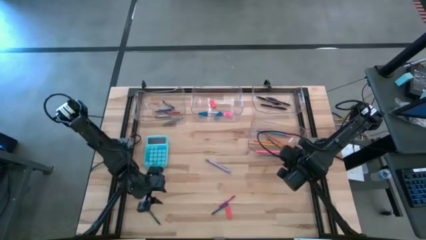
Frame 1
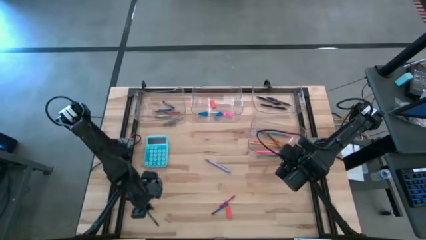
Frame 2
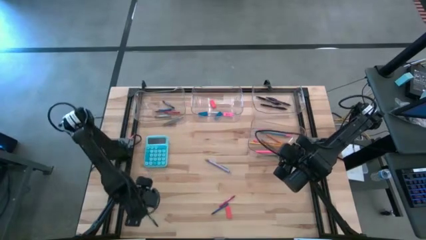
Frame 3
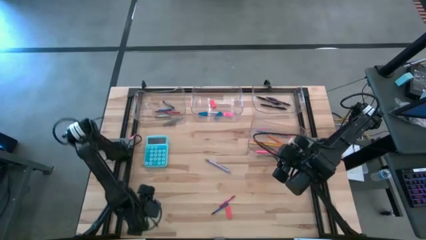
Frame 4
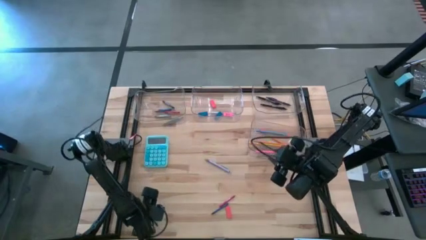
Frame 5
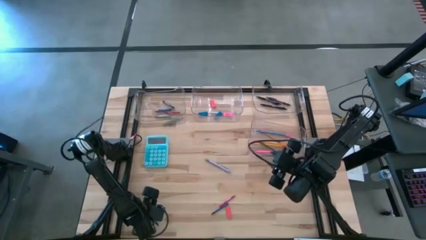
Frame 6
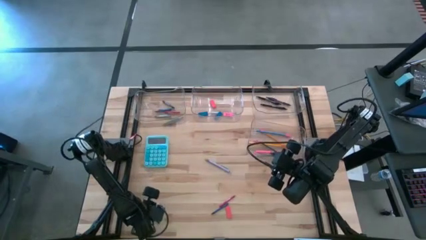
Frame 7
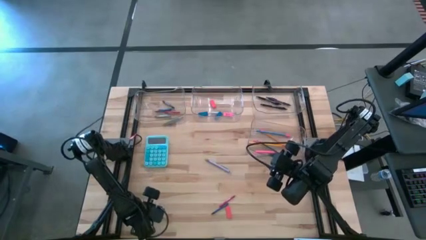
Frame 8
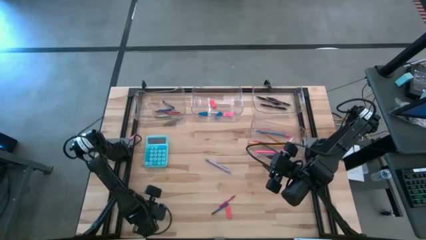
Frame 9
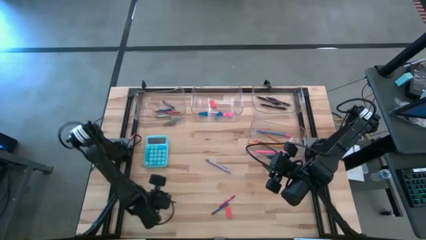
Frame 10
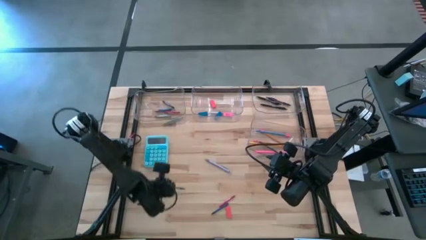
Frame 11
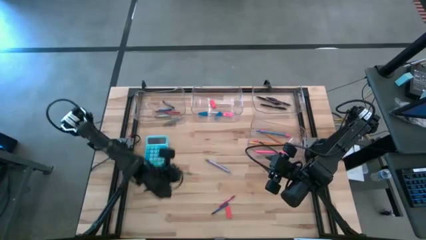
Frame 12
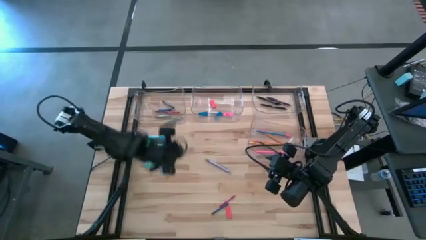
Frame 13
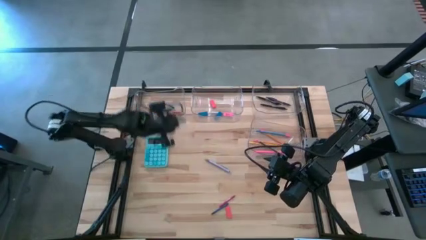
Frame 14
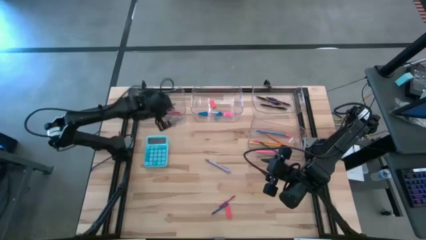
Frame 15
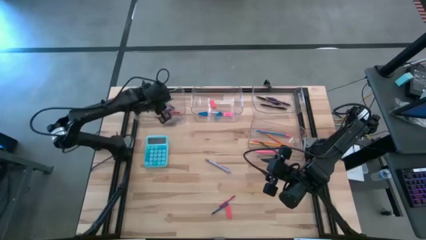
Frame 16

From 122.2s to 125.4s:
Task: Sort crayons/erasers/pens/pencils in bins
Put the green crayon into the top left transparent bin

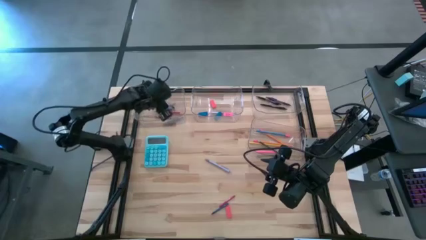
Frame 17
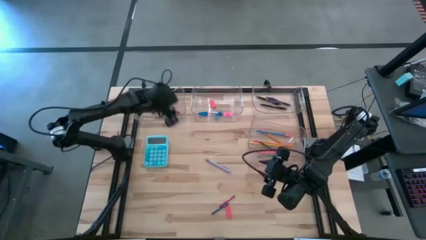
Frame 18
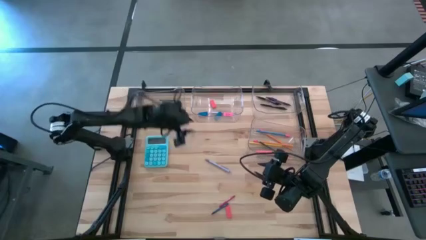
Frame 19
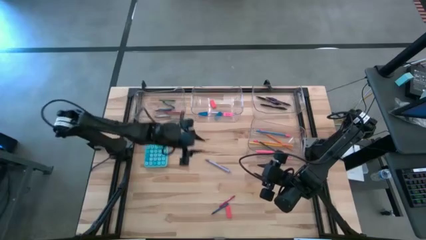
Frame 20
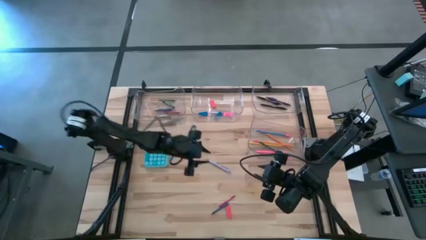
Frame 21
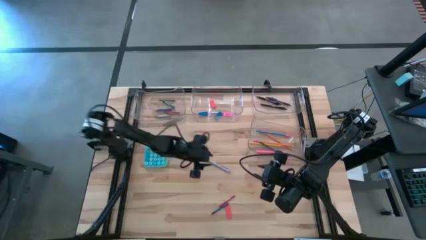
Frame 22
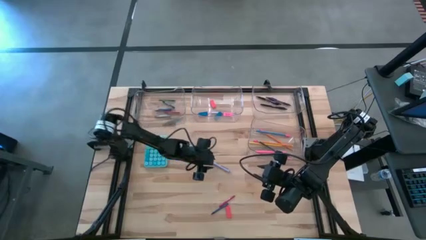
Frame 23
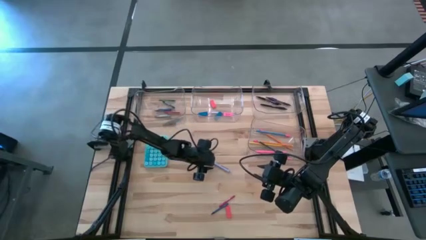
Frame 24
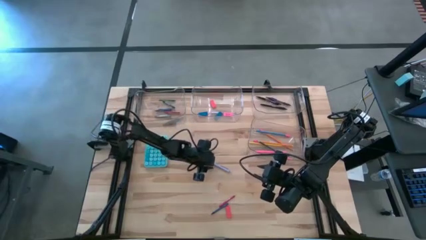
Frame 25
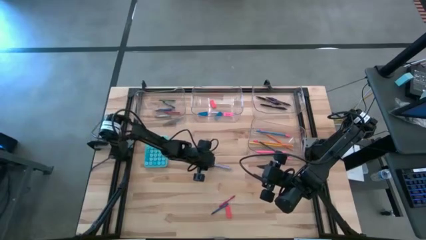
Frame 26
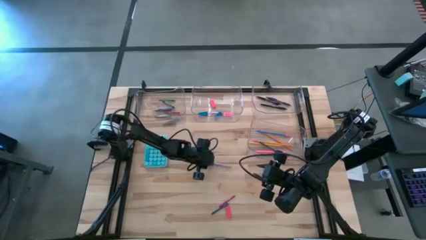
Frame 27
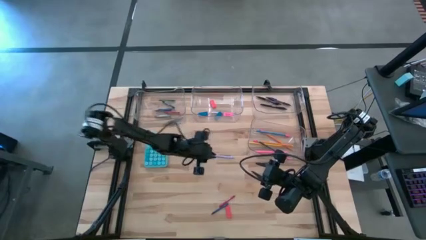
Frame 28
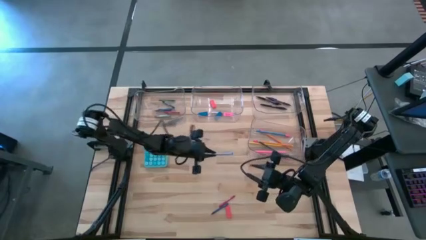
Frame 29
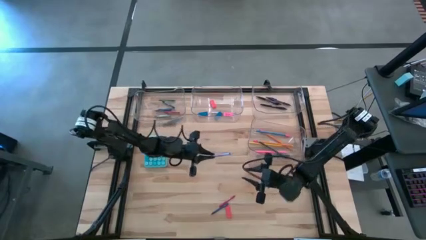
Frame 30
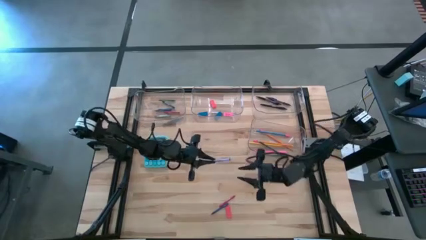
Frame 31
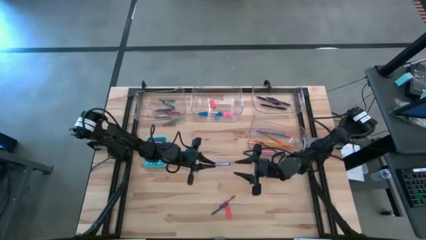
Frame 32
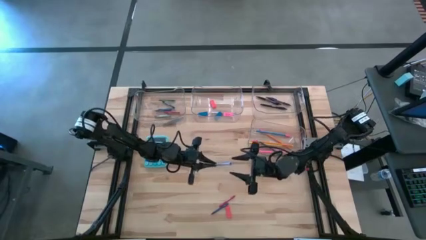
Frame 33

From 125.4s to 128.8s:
Put the gray pen into the top right transparent bin

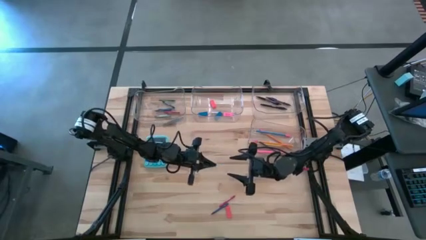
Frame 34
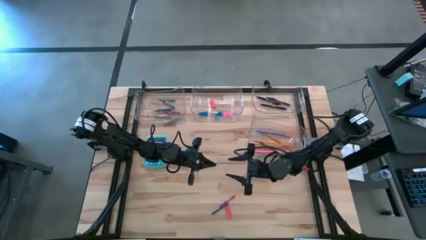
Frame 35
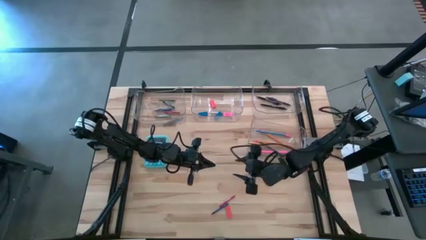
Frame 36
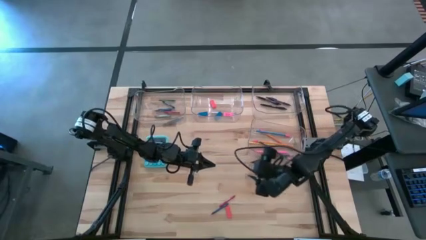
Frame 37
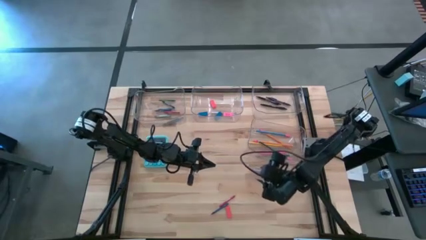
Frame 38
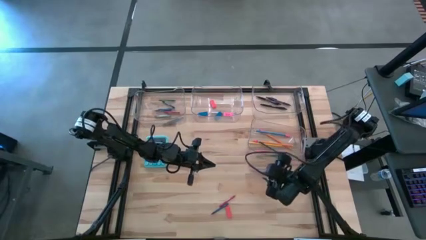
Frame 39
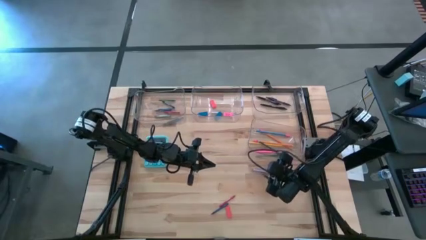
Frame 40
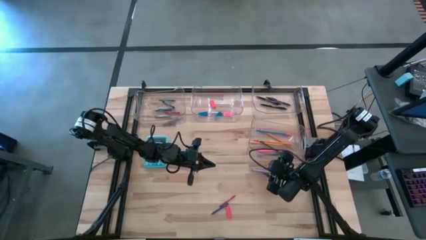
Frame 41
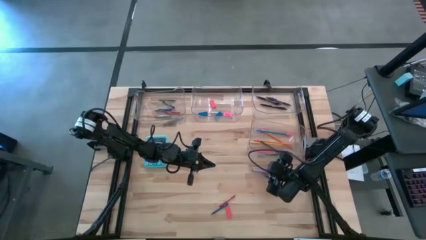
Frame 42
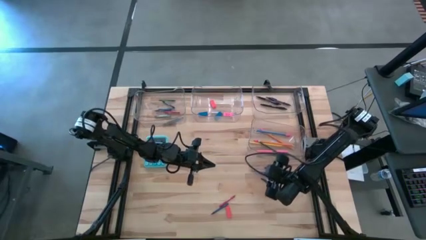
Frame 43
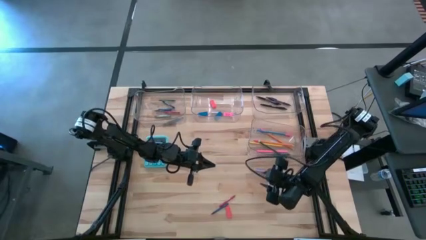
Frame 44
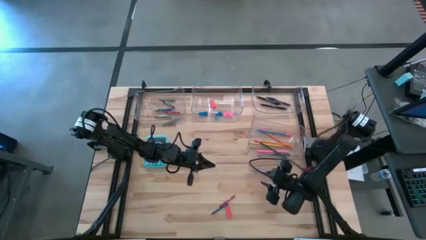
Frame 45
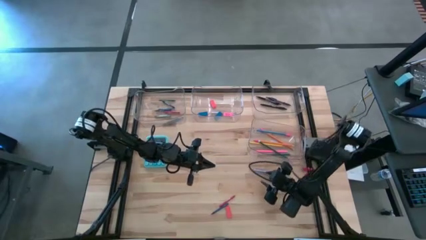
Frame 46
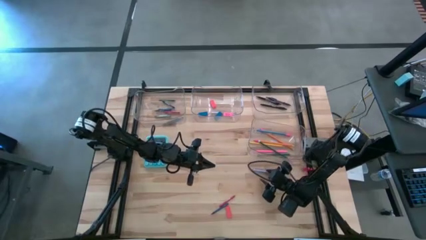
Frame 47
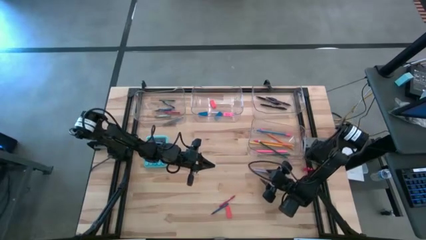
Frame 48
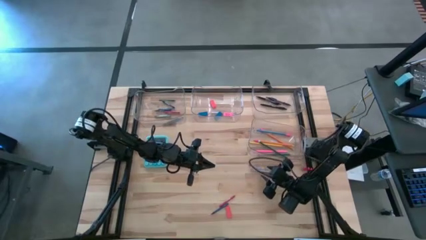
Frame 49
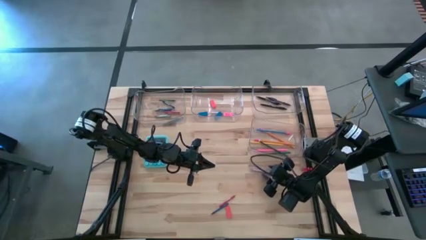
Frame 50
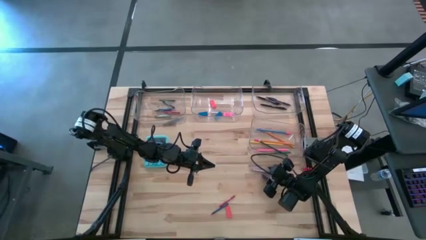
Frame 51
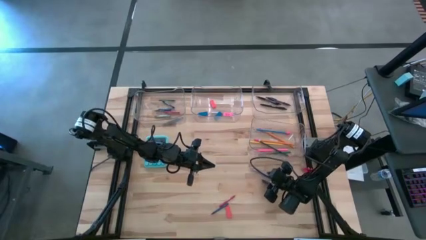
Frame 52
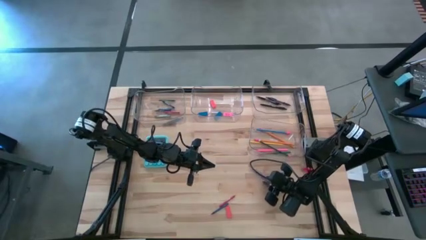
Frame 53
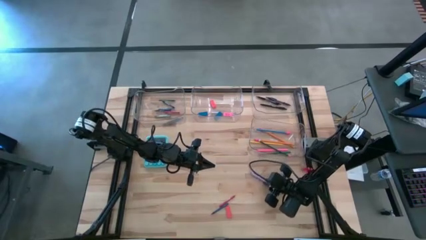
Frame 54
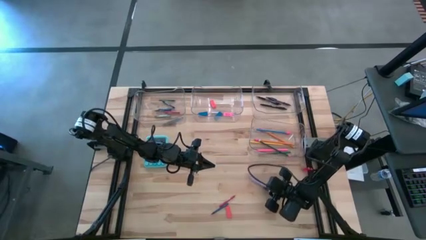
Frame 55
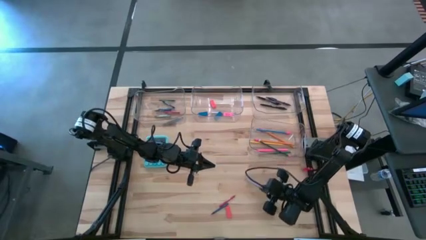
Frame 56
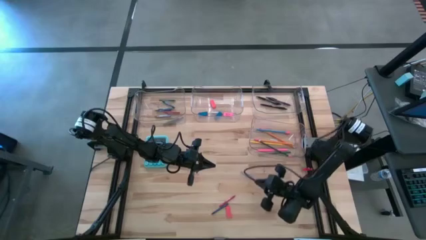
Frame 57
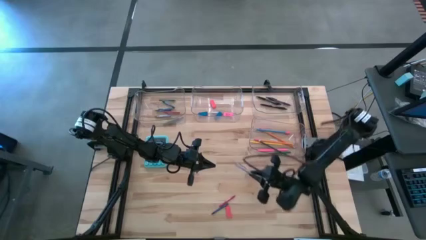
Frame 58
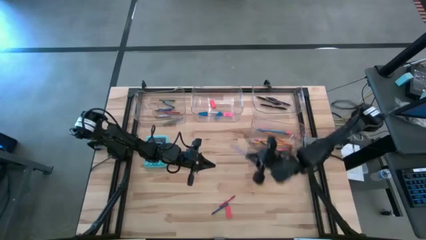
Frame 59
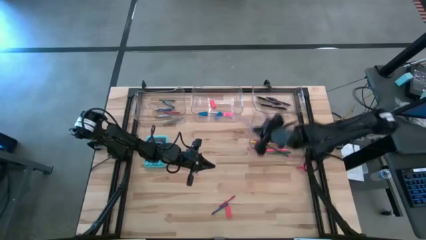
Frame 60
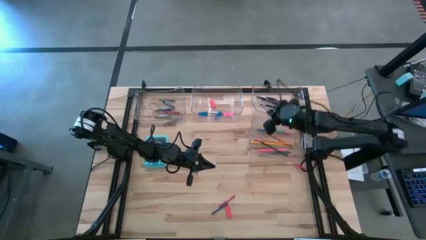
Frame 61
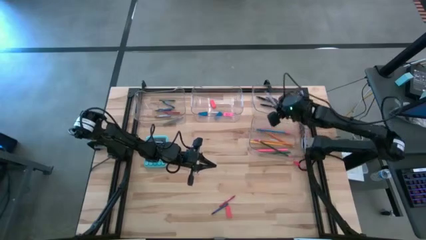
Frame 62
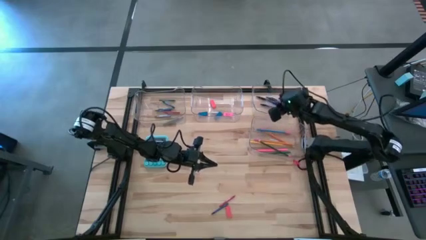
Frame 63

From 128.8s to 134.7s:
Put the gray pen into the top right transparent bin

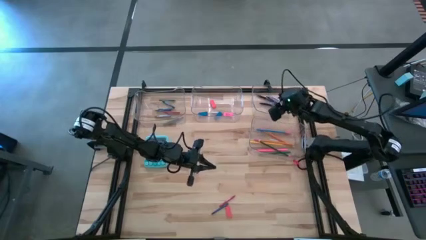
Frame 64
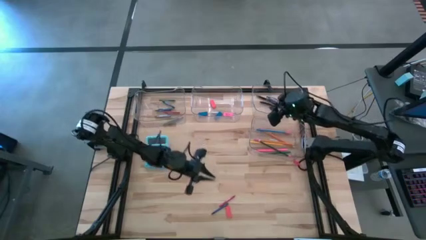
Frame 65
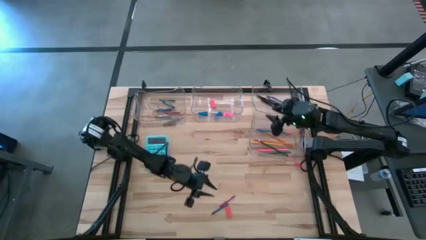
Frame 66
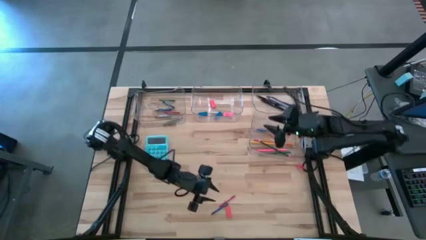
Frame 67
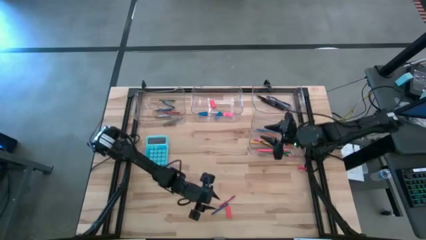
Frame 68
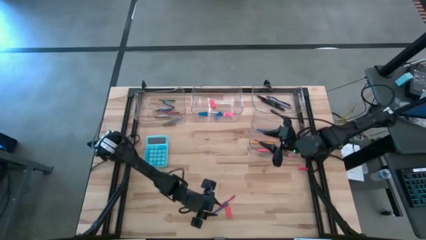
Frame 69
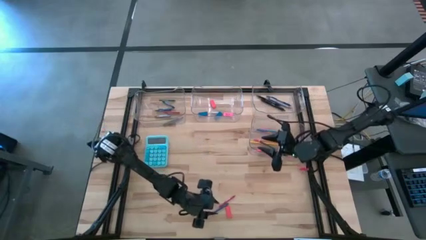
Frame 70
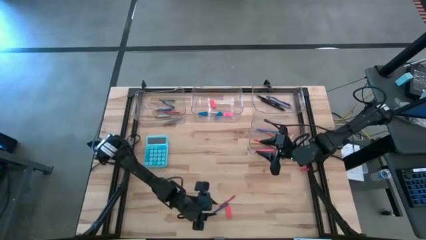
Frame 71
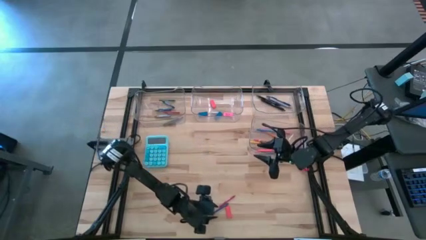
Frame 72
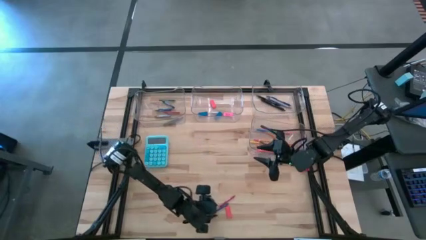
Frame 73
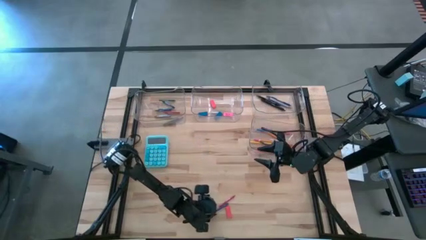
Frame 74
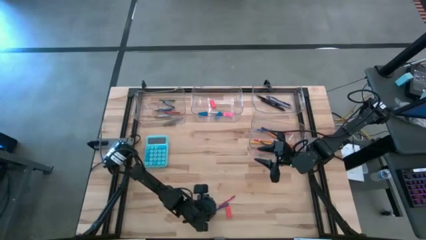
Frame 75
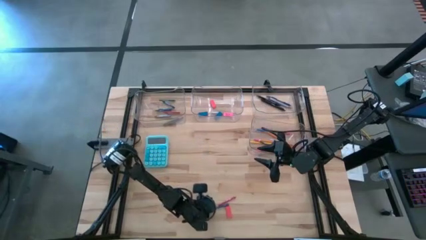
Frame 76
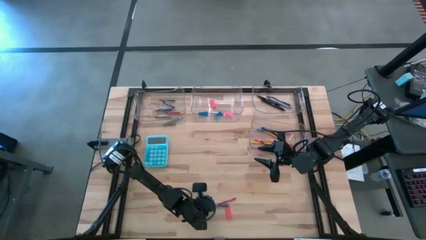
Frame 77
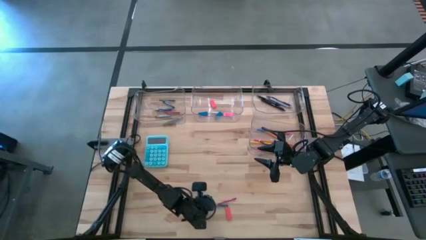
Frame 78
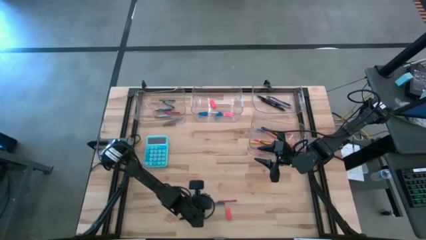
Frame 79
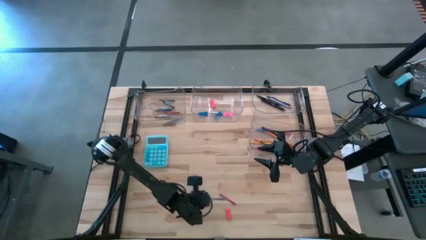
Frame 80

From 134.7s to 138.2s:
Put the blue crayon into the top left transparent bin

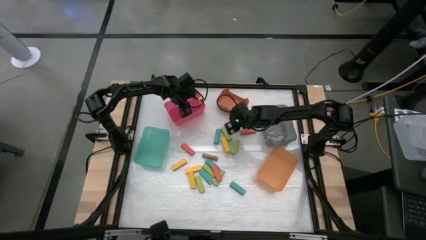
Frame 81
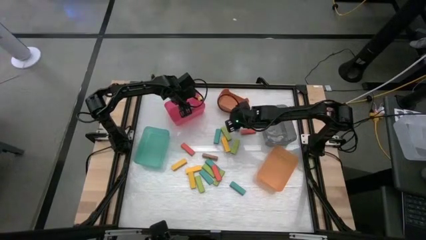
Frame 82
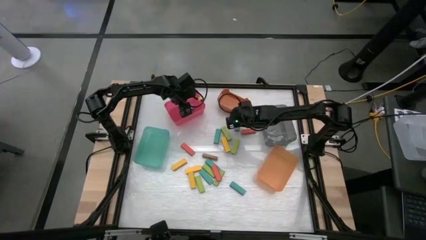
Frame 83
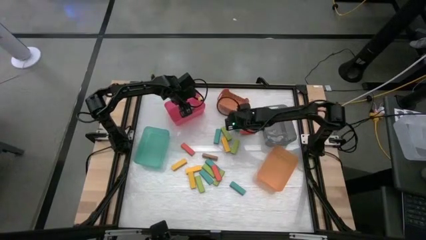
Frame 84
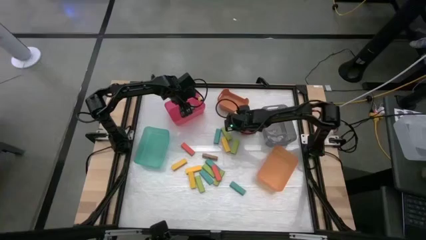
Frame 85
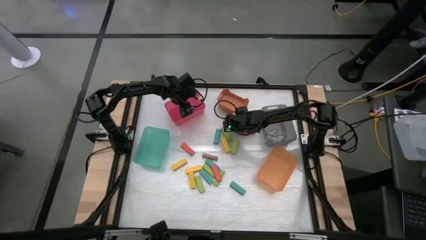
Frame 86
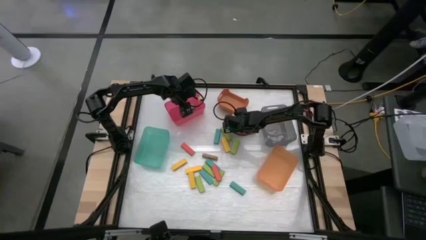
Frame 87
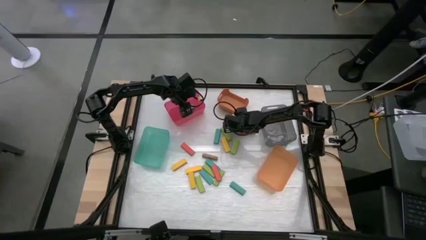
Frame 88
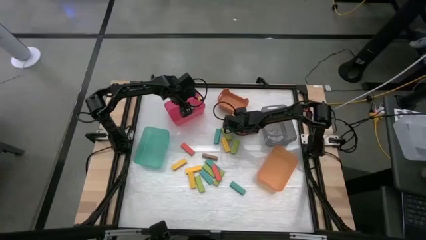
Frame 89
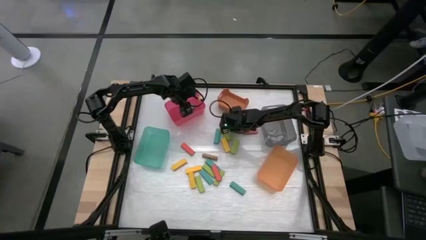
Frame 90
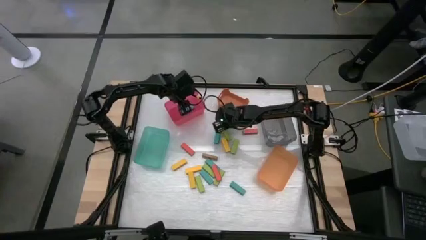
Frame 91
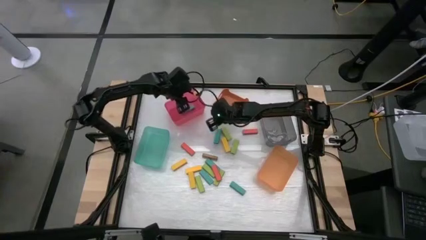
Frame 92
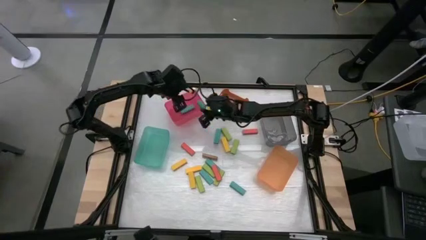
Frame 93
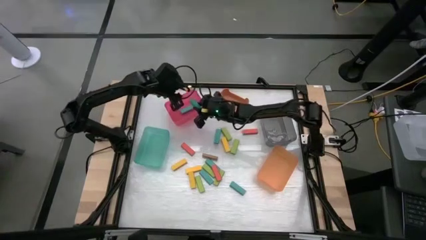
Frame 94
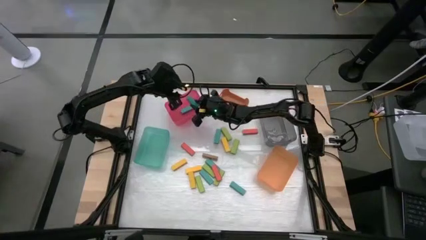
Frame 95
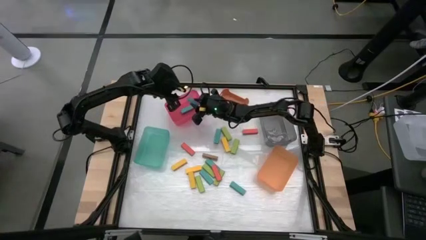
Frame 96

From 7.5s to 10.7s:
Task: Sort blocks
Put the blue block into the pink bin
